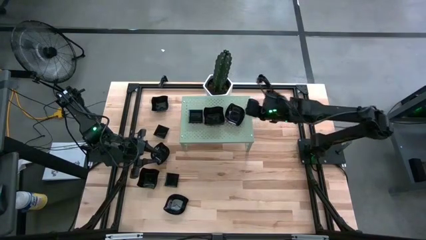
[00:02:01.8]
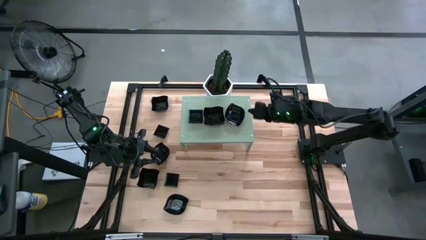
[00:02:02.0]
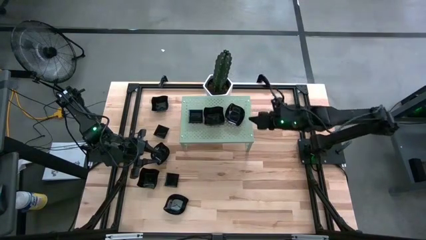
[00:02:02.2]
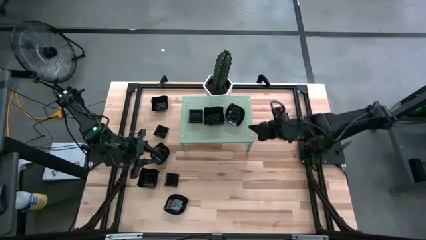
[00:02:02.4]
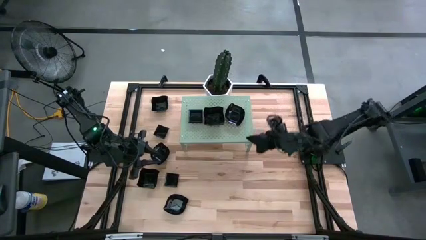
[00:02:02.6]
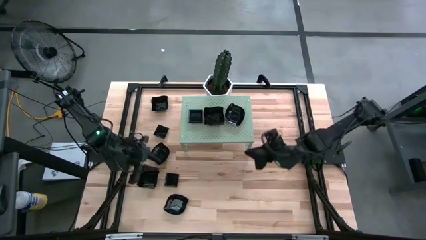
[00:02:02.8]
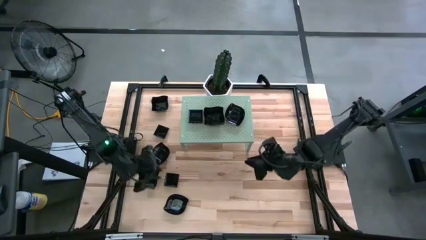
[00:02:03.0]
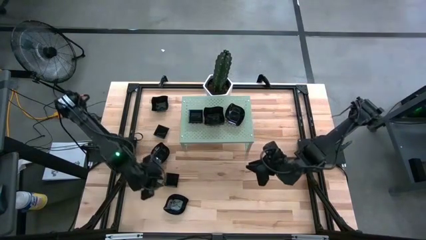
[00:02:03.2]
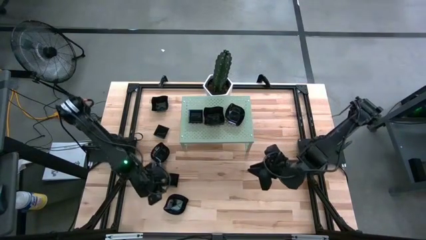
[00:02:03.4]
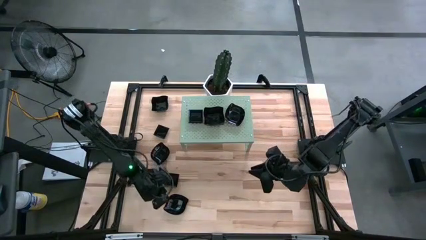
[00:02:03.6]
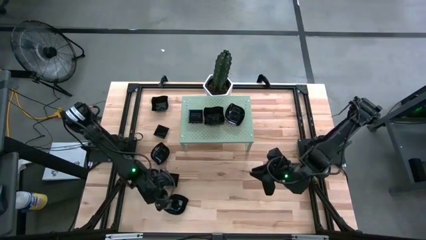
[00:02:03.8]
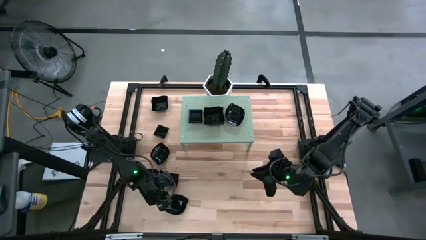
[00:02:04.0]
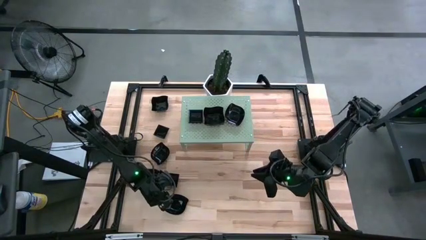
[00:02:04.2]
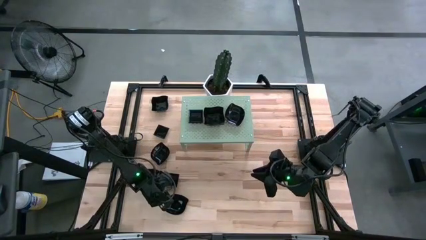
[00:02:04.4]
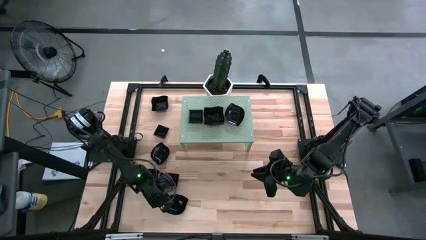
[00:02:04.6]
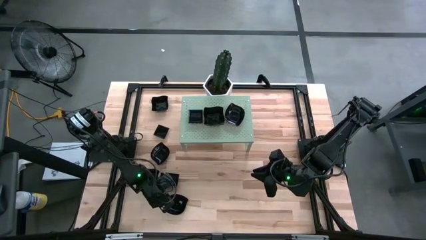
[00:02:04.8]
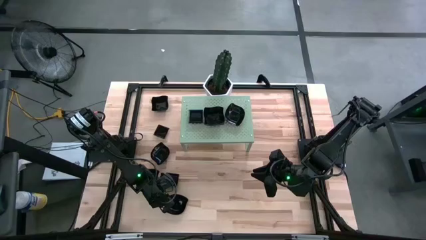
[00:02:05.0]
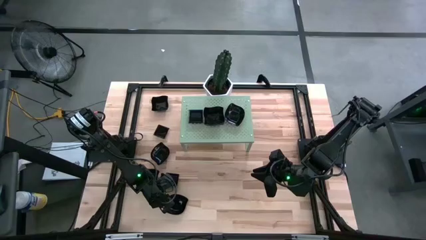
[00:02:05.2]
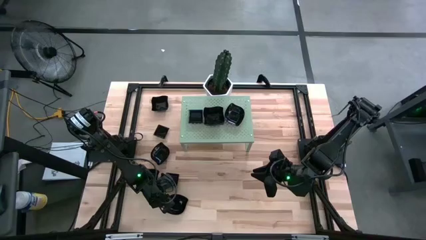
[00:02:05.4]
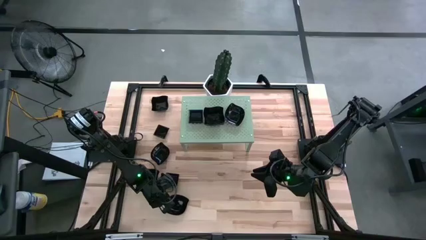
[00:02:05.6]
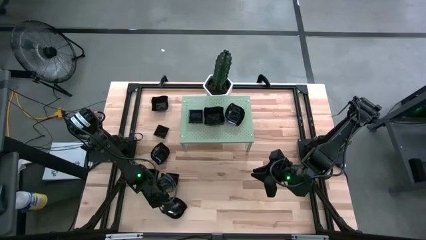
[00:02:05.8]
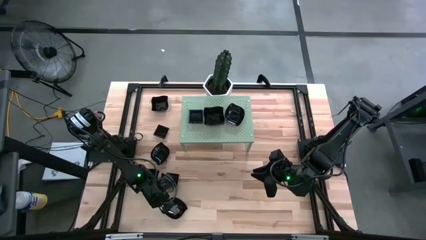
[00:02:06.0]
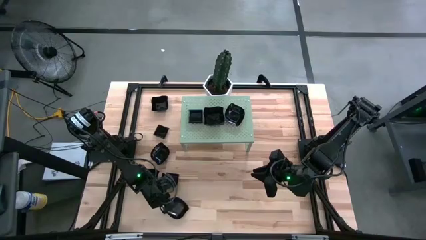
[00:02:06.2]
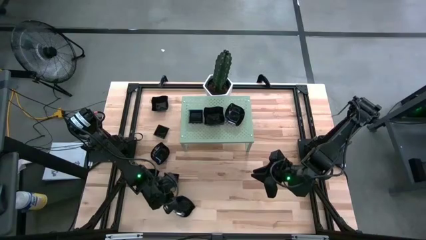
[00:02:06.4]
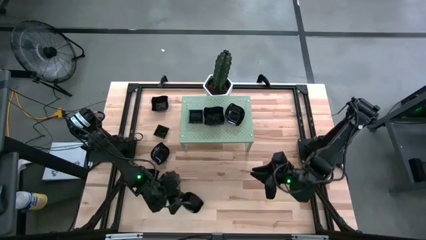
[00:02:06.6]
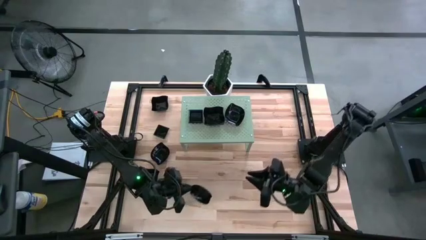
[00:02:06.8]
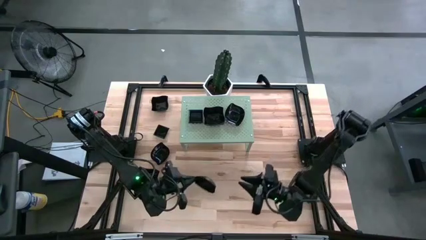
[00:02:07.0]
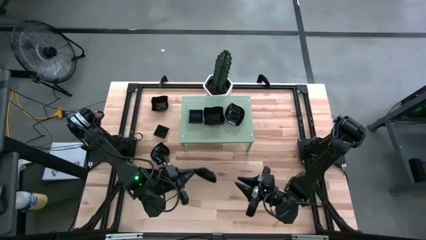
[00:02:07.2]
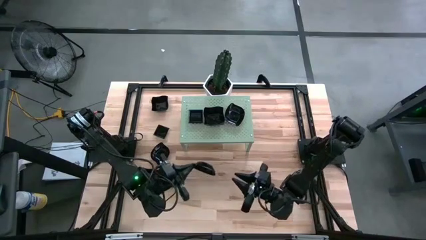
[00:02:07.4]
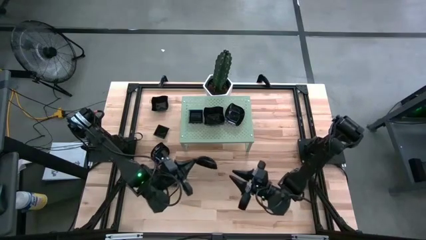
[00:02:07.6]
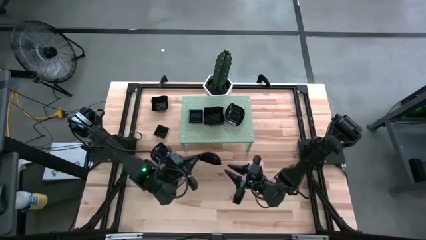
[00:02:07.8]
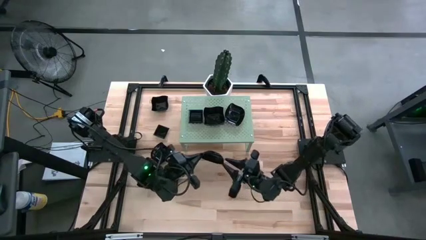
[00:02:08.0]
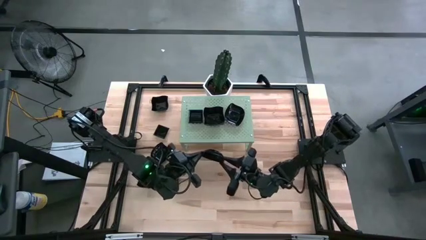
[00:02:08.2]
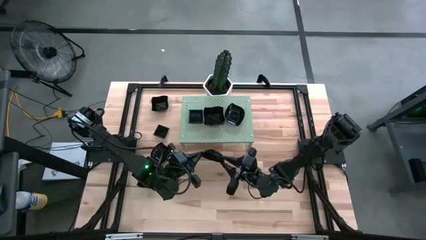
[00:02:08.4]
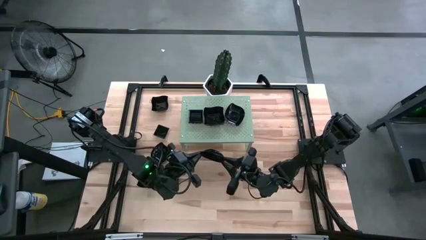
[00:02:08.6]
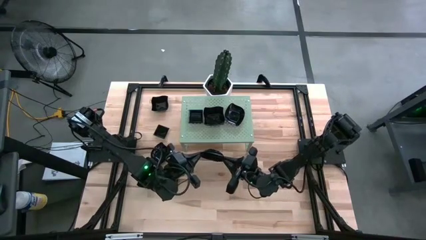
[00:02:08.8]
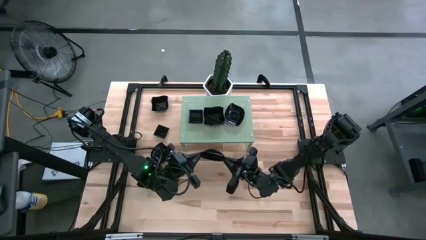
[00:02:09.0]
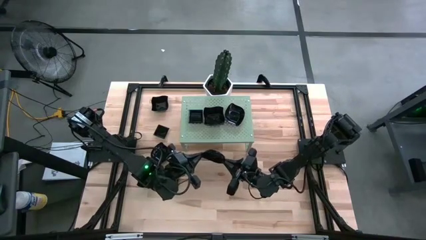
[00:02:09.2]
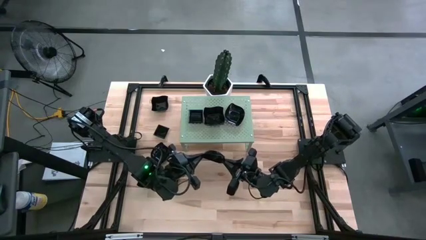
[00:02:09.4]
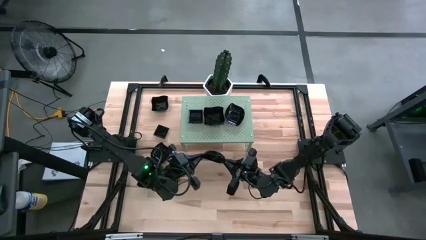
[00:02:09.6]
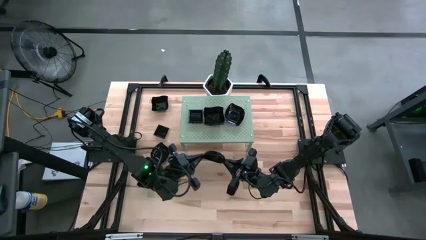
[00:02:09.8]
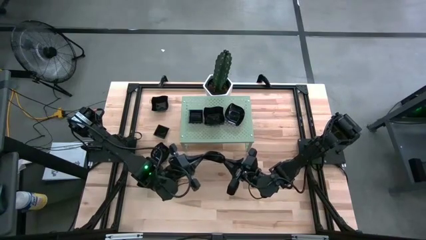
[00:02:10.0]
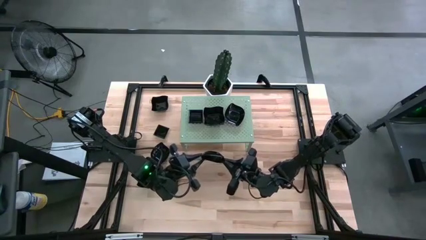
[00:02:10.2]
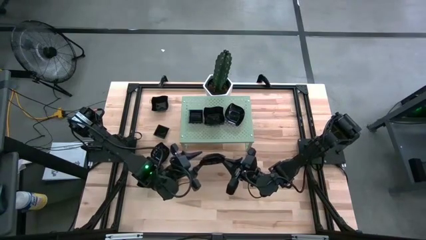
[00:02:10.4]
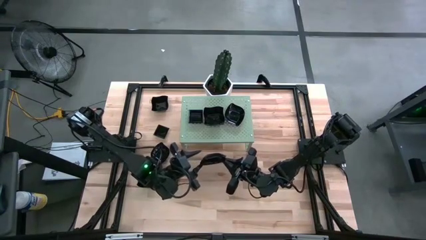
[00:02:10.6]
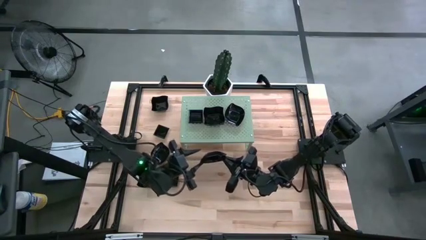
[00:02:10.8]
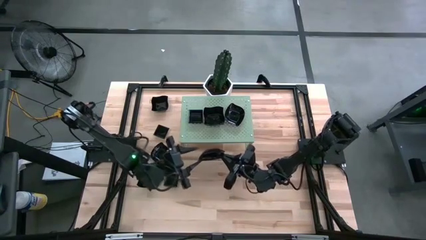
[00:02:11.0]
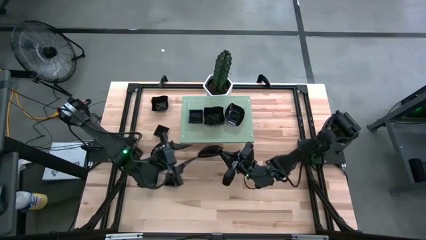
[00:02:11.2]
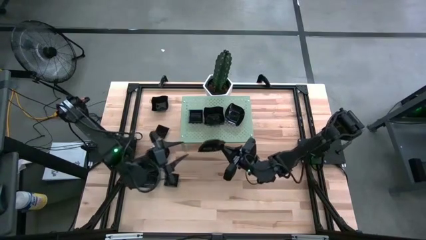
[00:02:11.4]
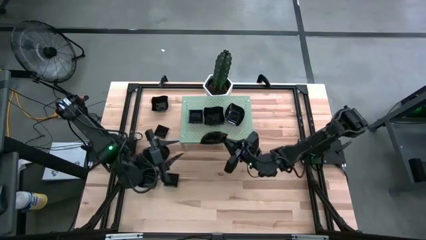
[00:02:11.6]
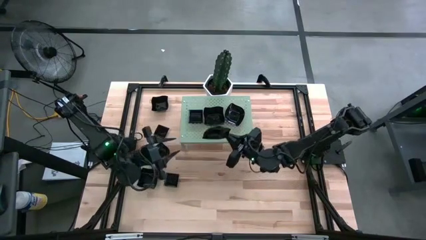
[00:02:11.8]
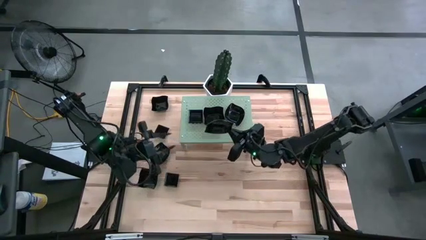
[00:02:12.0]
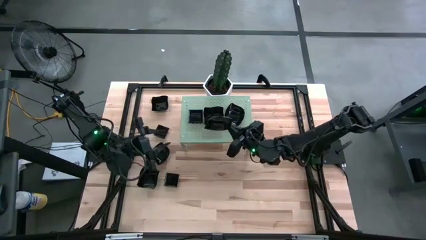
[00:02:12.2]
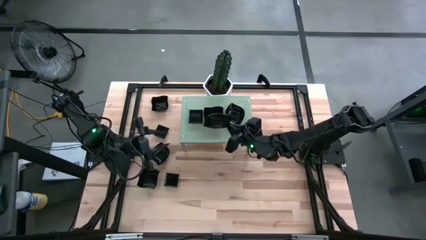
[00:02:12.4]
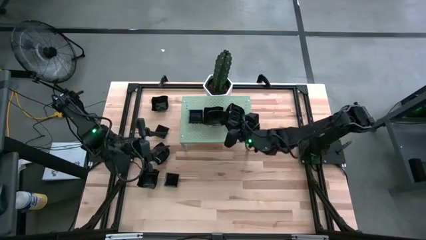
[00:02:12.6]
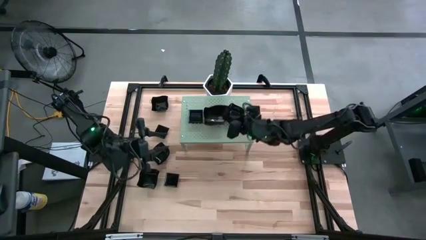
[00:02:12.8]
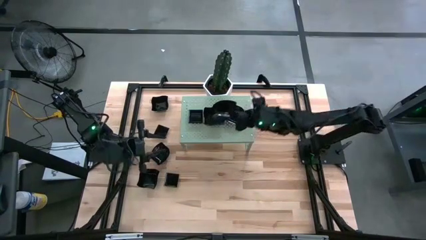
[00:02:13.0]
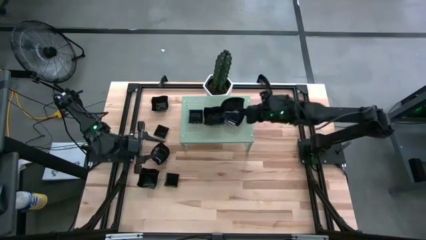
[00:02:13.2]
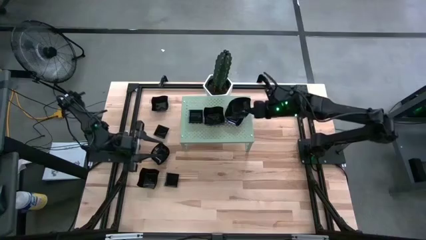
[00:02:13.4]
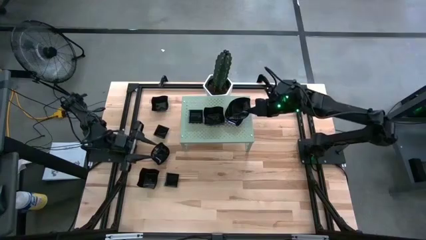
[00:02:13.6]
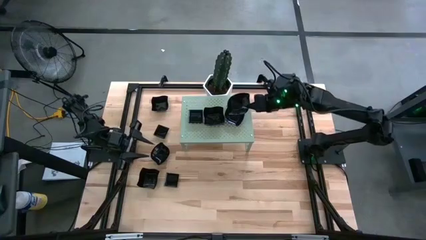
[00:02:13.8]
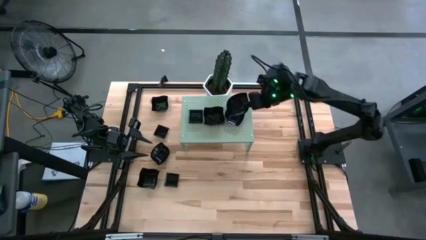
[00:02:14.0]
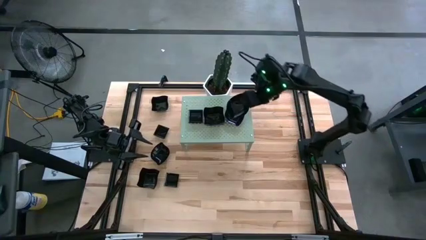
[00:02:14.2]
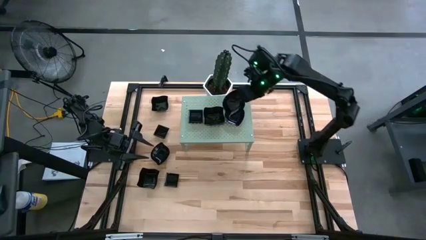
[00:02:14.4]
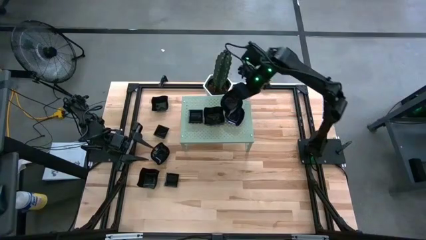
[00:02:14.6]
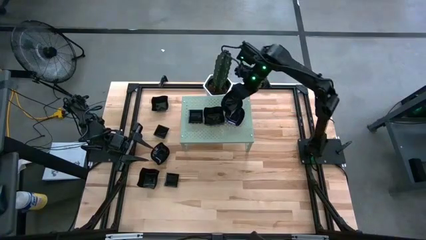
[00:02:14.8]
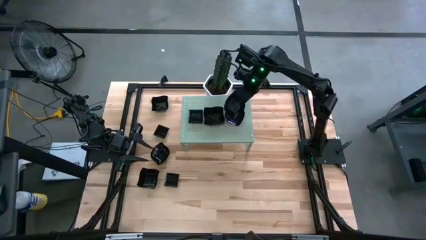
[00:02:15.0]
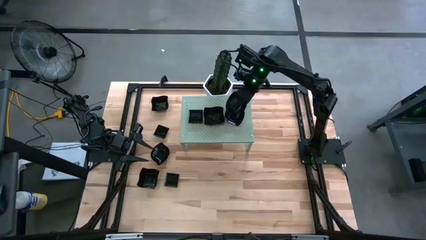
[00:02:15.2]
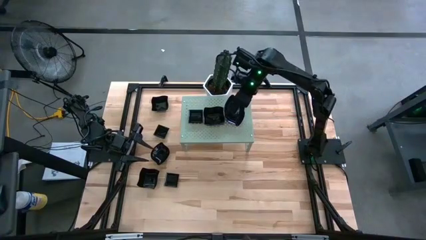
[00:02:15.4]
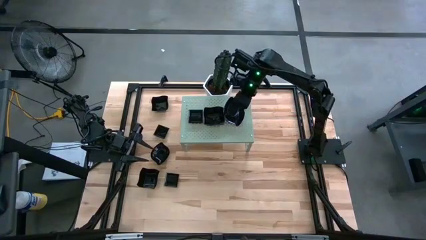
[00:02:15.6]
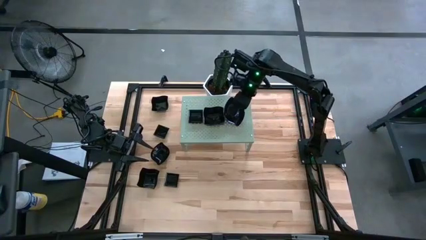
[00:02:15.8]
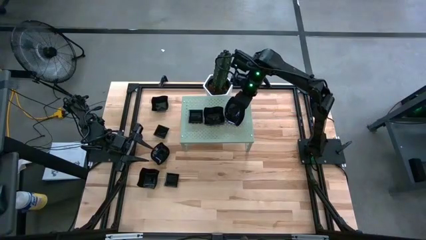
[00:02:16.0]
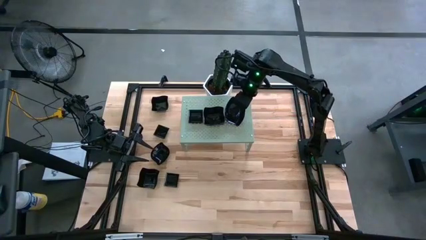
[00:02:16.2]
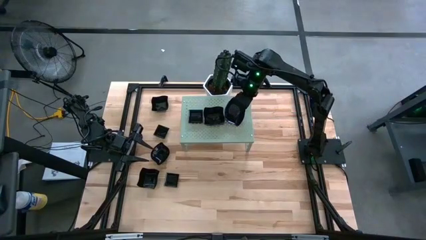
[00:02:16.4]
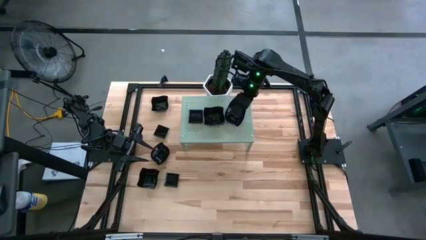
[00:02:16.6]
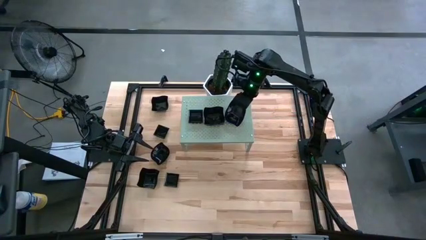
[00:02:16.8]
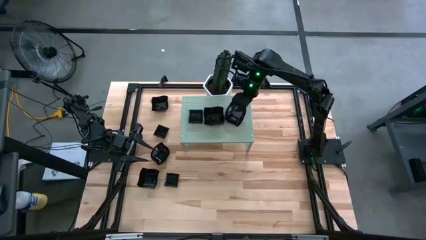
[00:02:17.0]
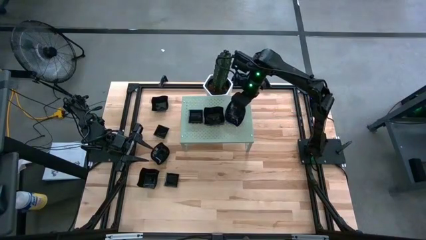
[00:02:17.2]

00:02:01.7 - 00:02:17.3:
Task: Pick & Place Mini shaped plates
Stack the leaf shaped plate on top of the leaf shaped plates on the shelf
